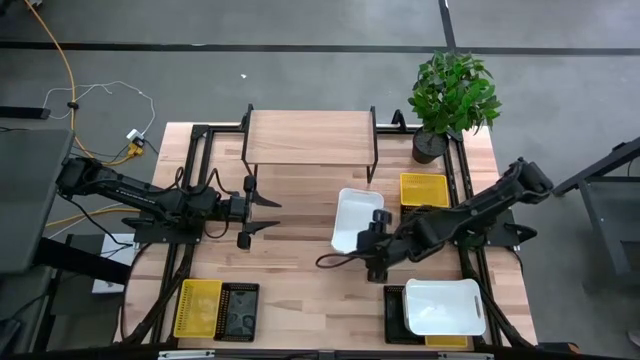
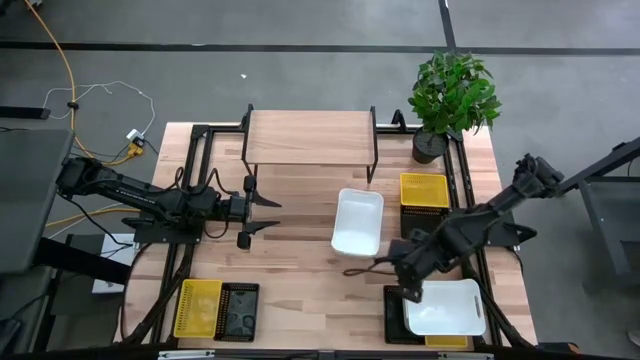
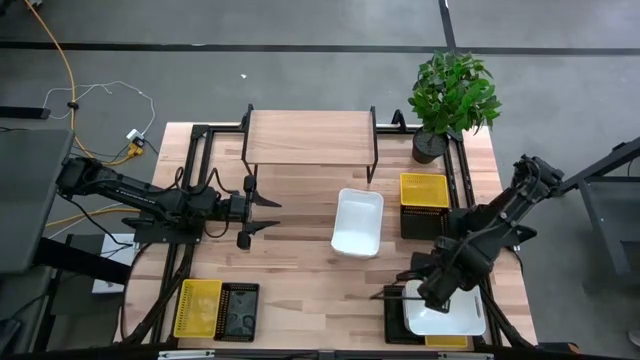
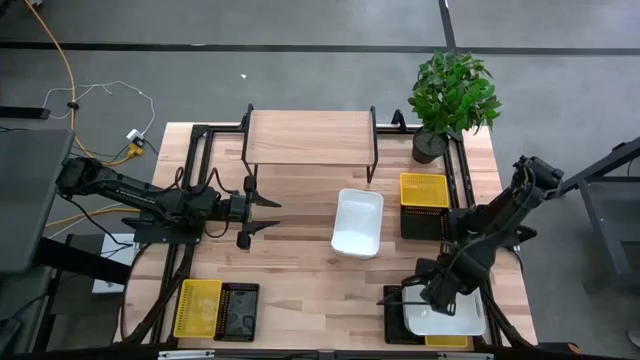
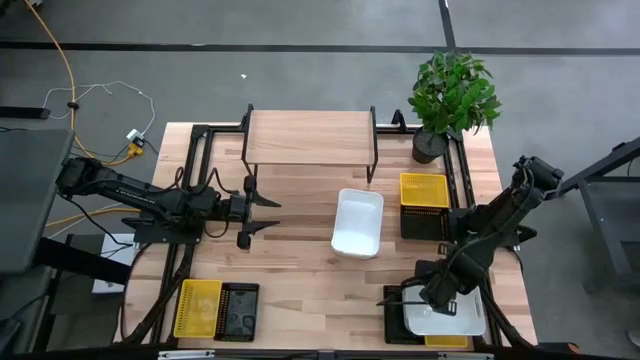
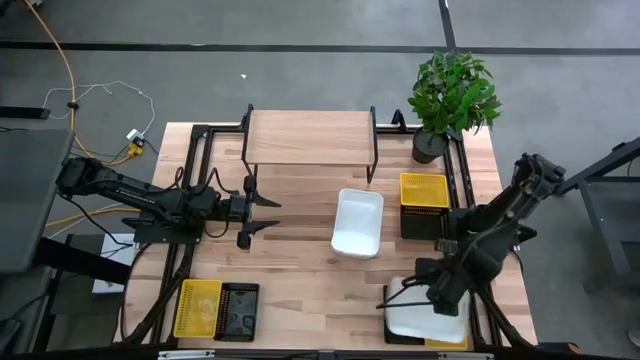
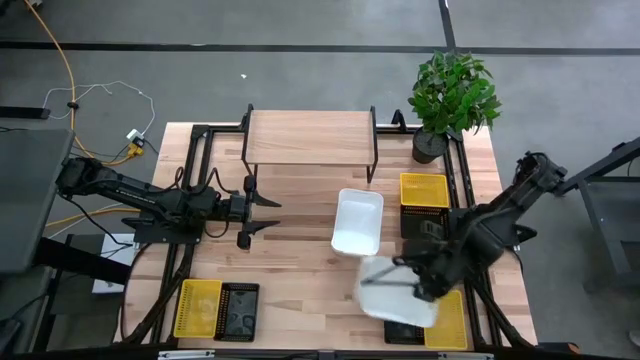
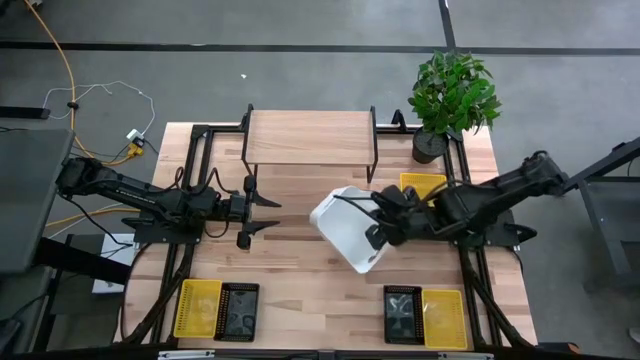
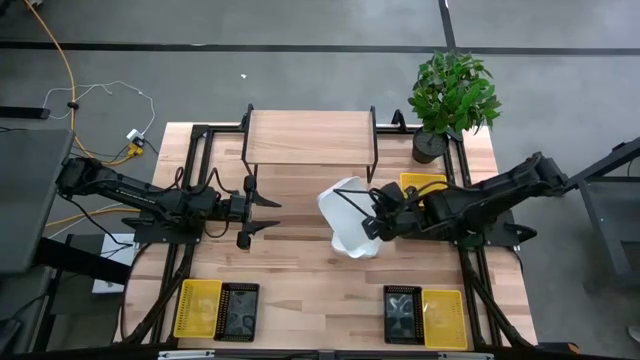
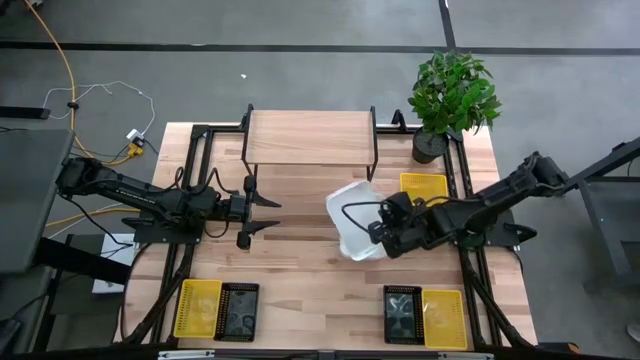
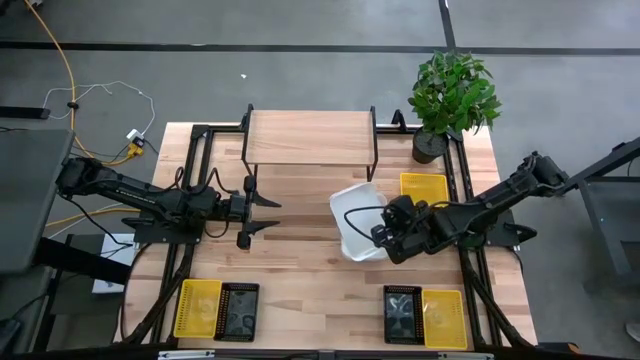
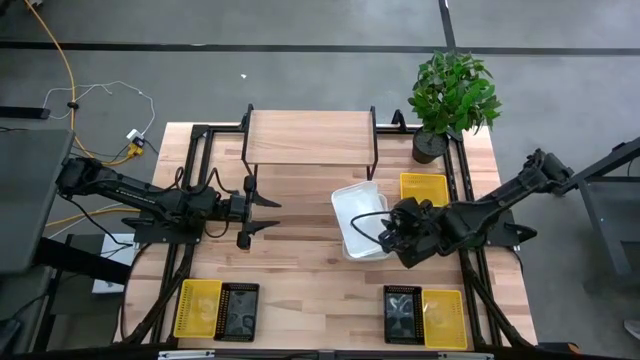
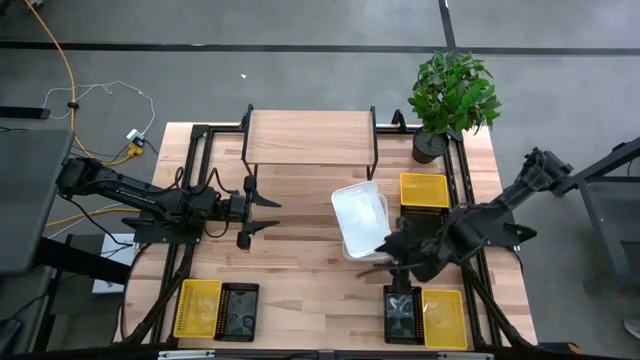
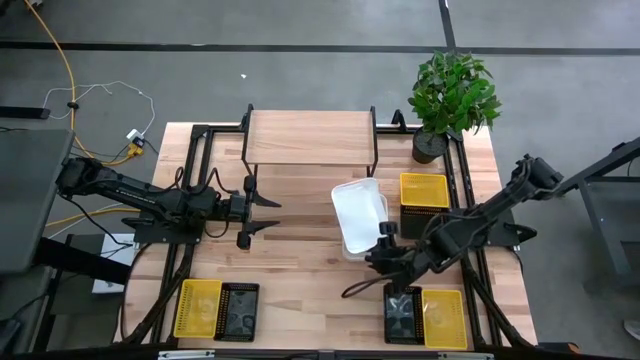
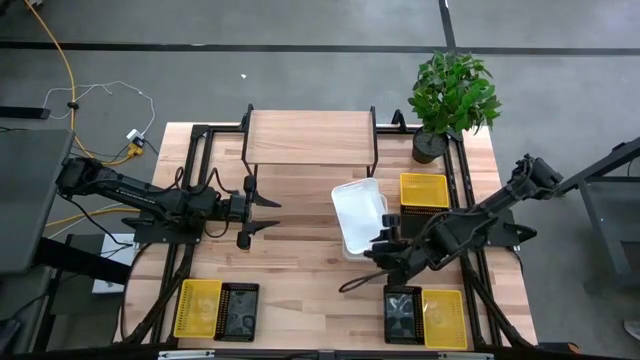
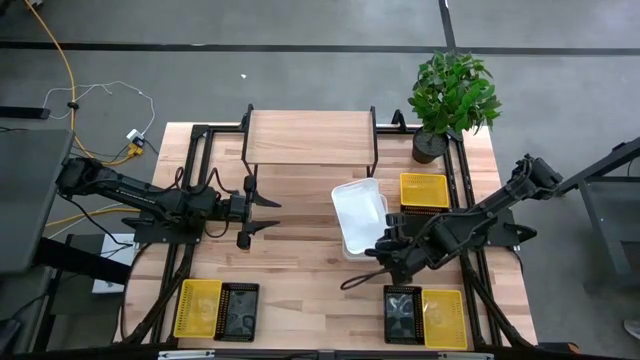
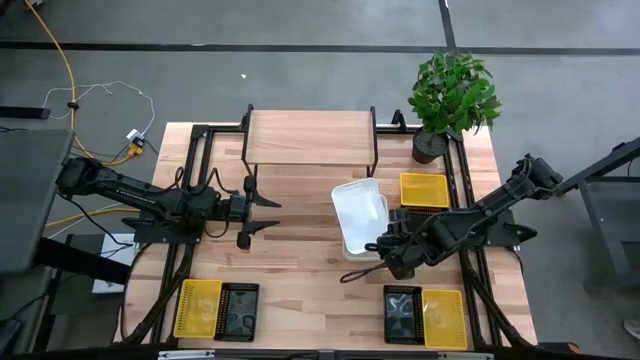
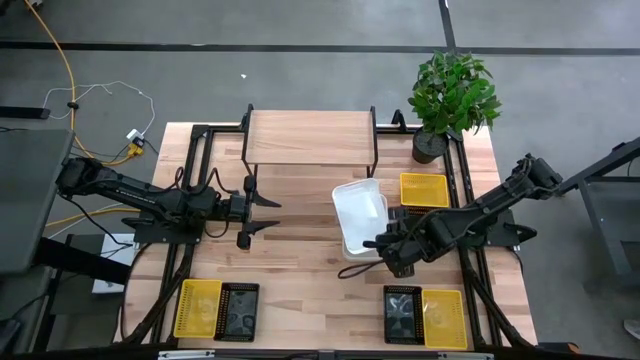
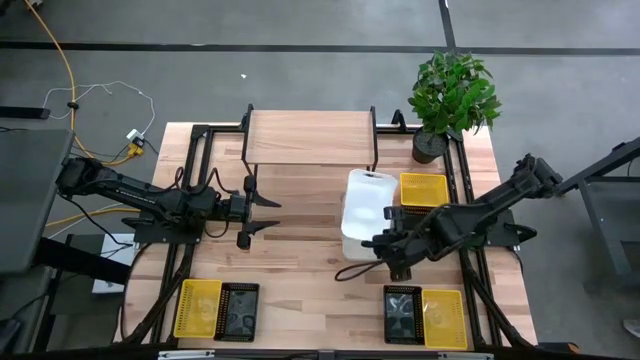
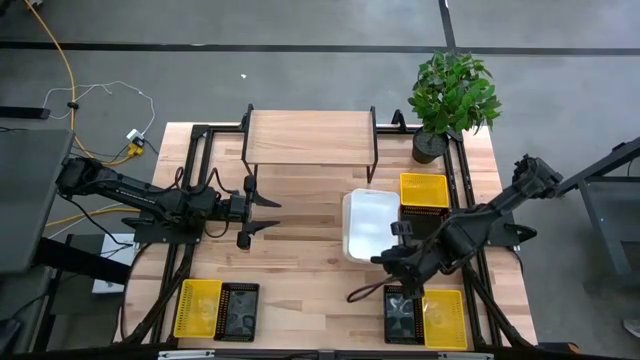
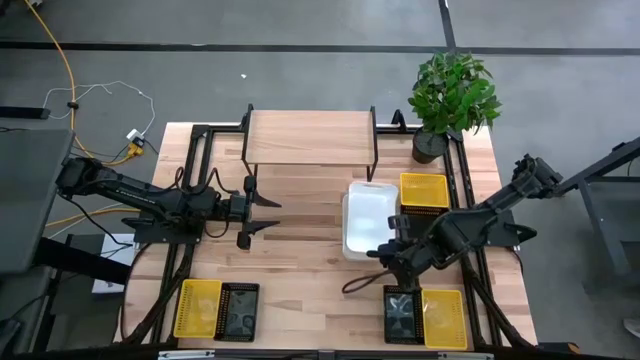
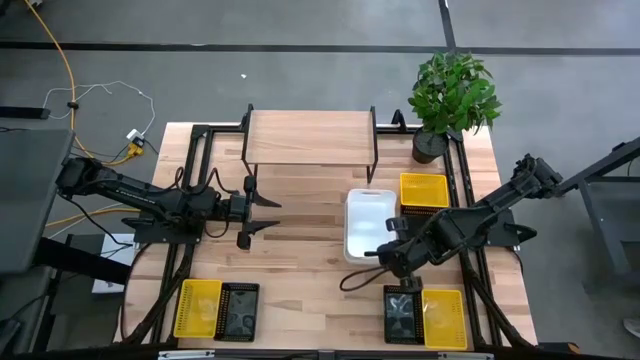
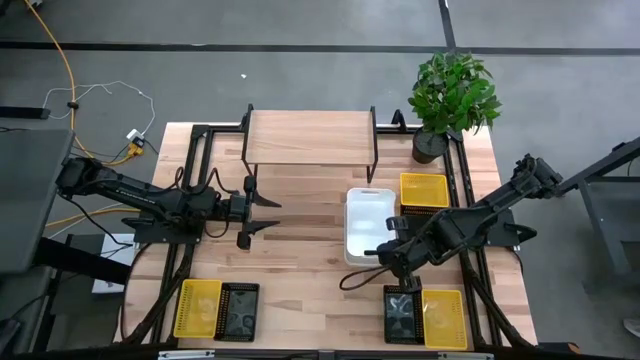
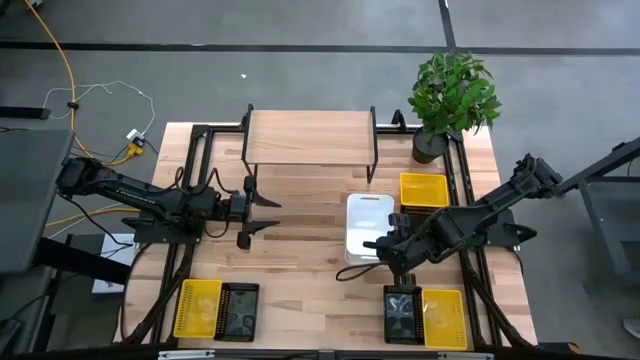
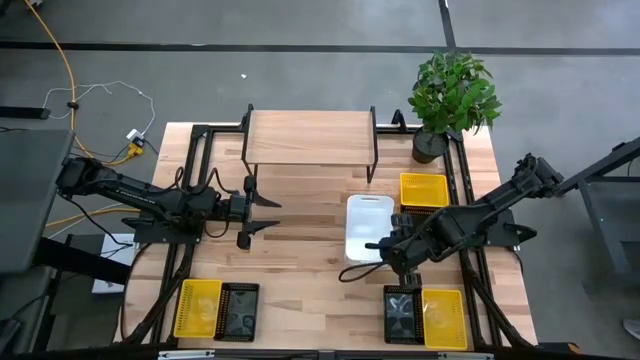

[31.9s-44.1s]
Task: Stack baskets on shelf by color
Stack the bottom white bin on the stacked white bin

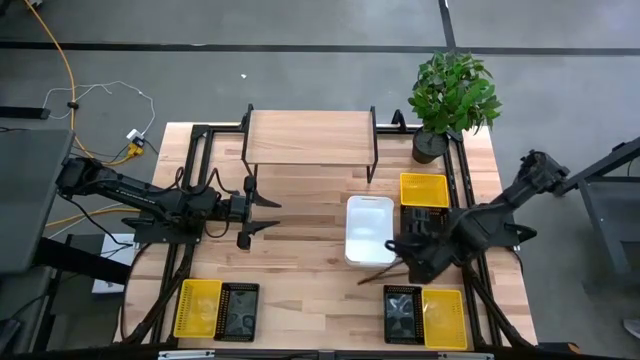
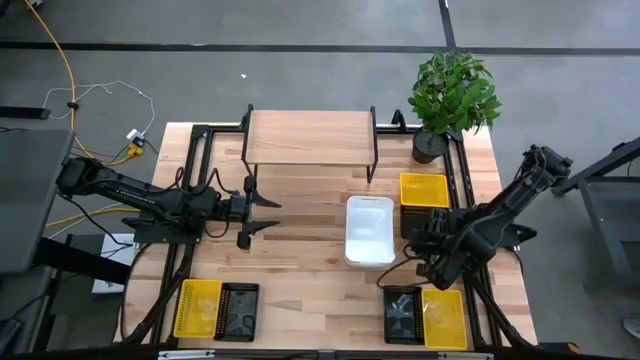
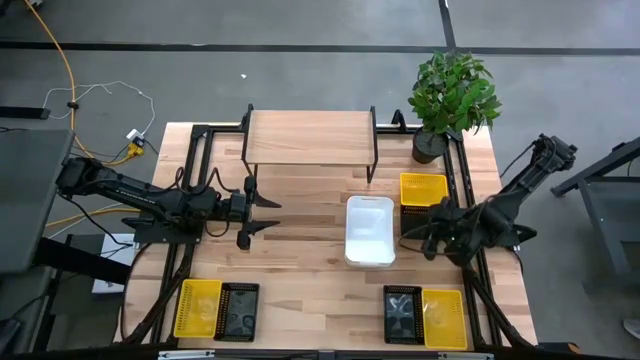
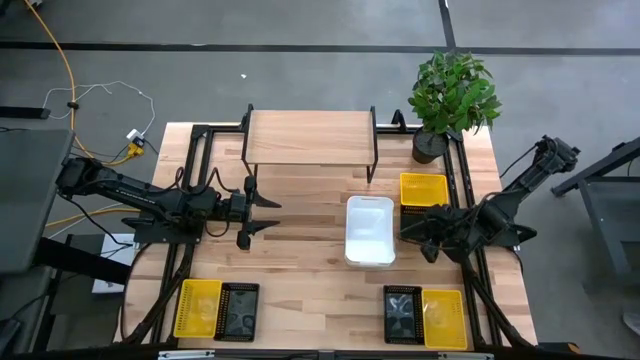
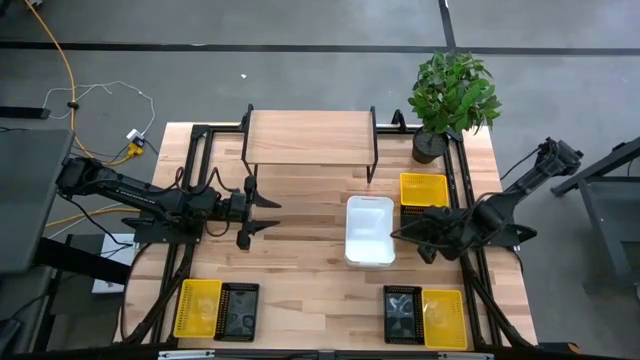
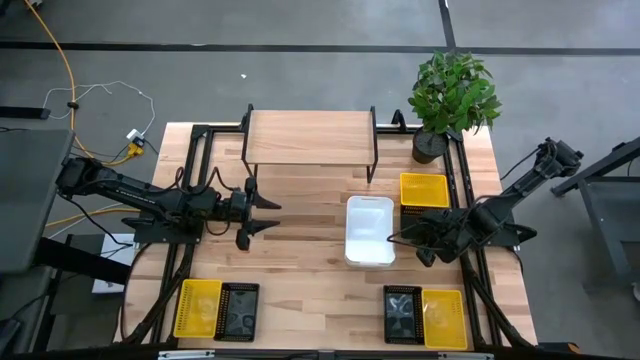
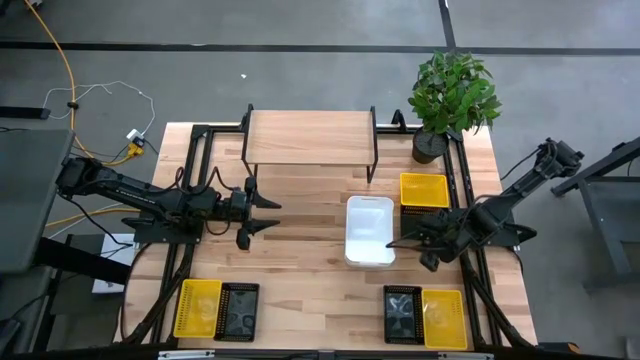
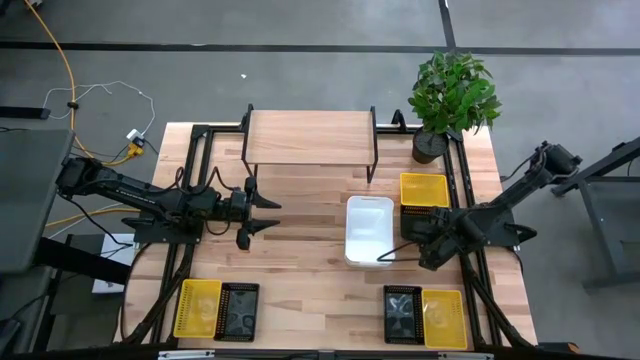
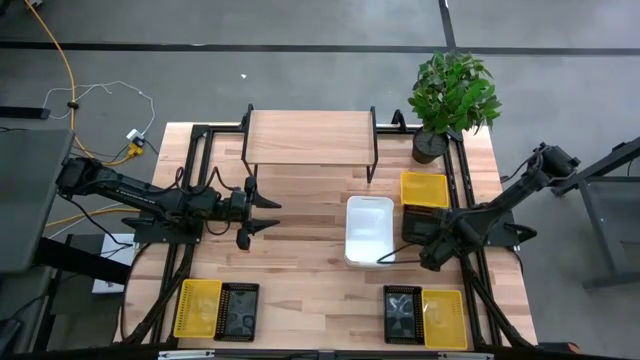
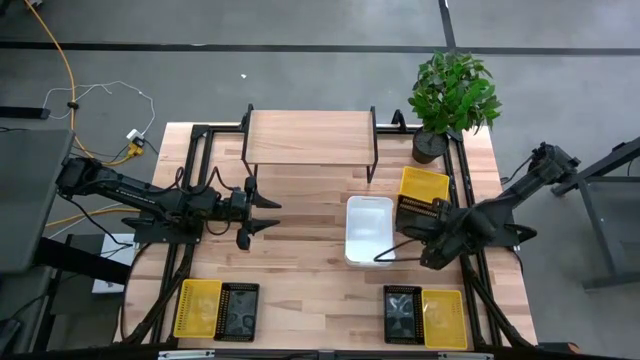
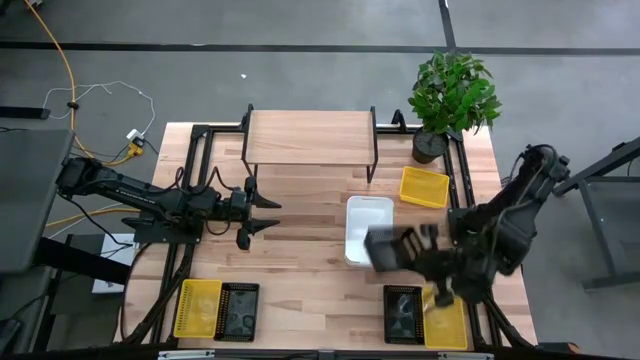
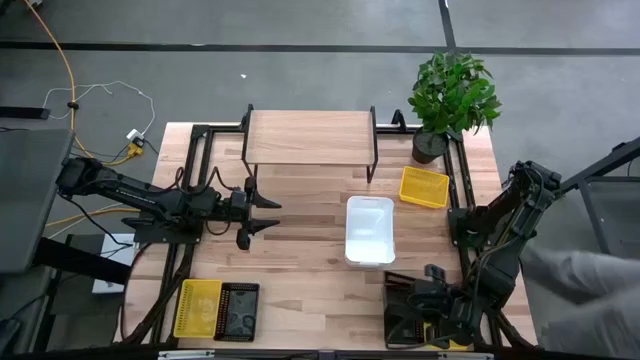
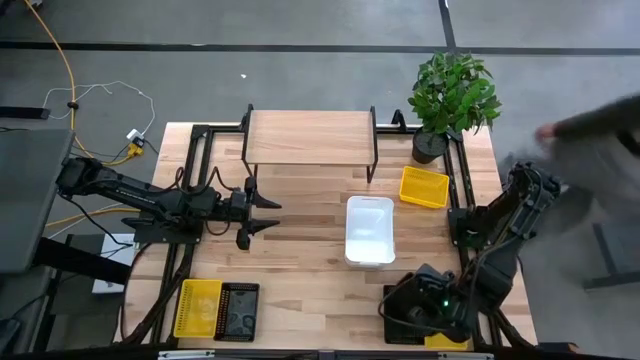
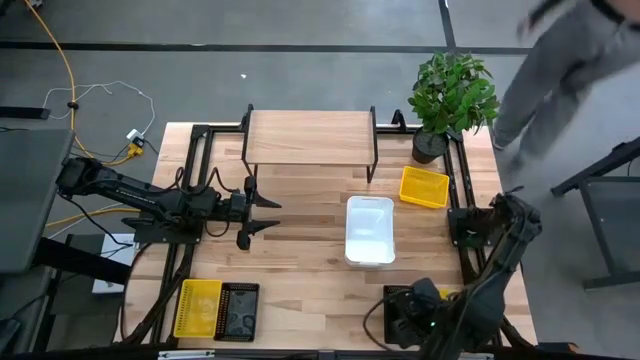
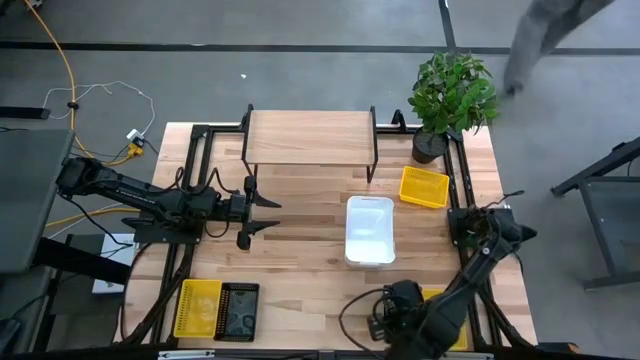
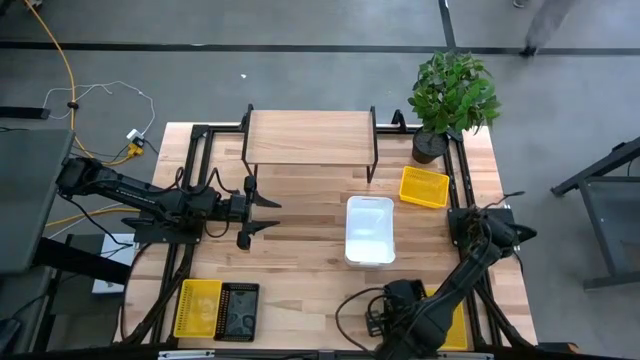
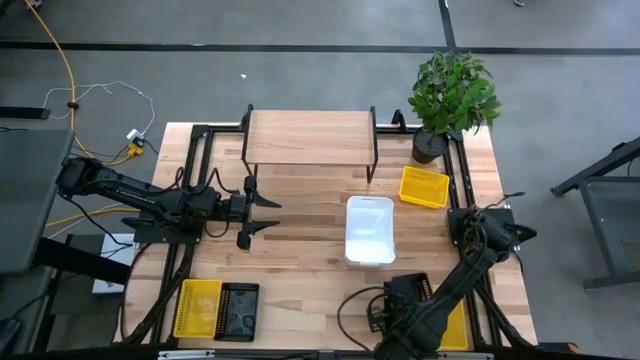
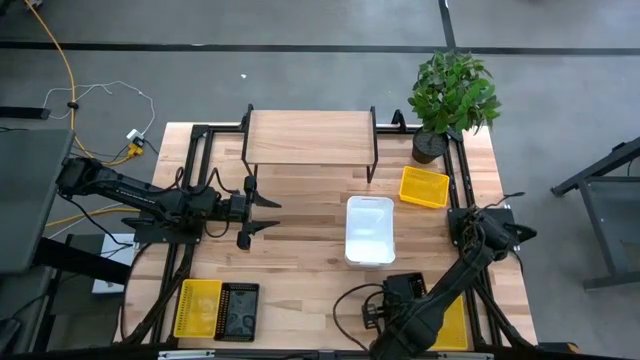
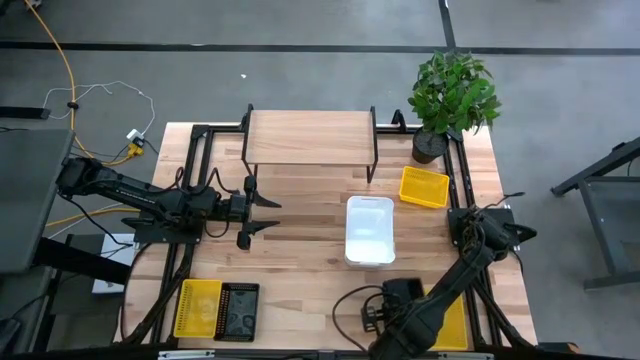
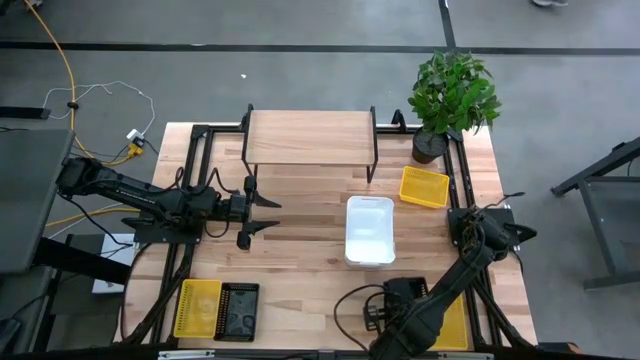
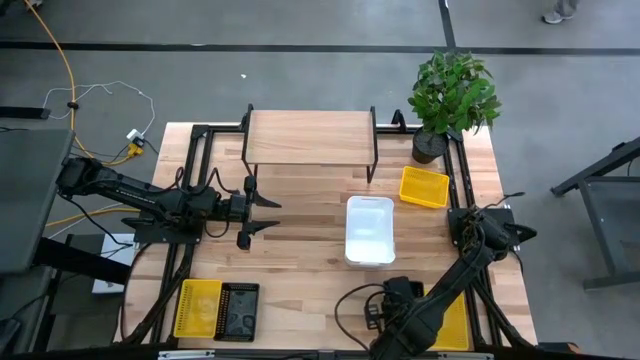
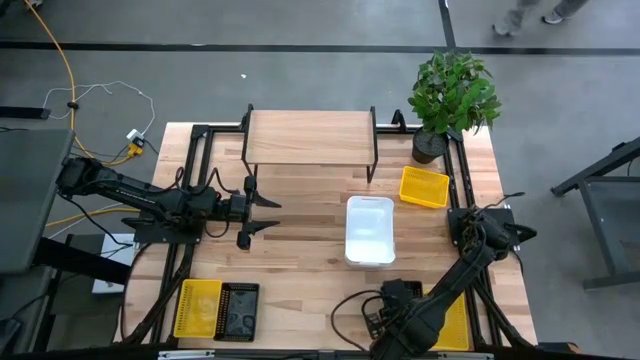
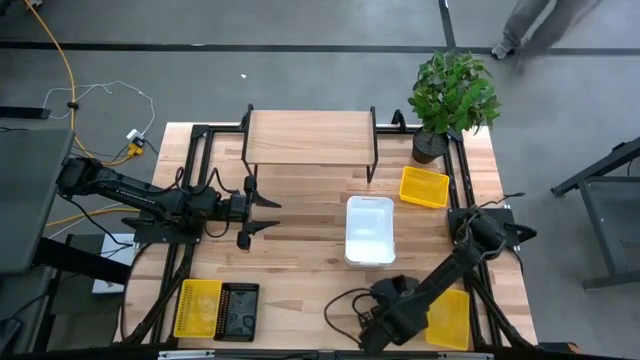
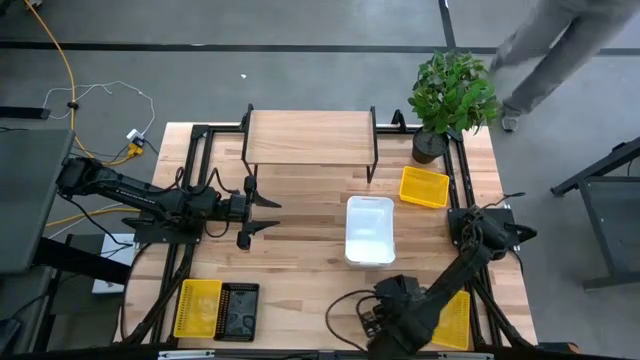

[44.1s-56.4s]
Stack the top right black bin on the bottom right black bin
